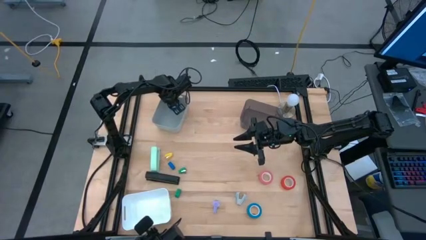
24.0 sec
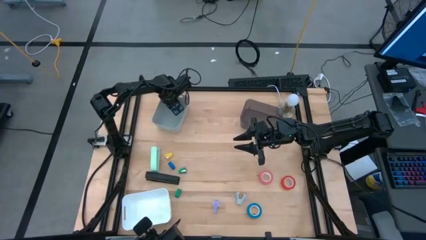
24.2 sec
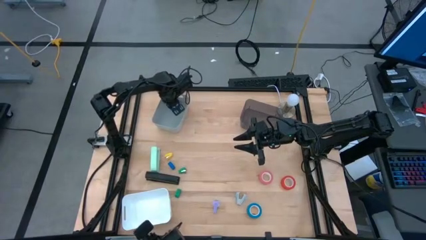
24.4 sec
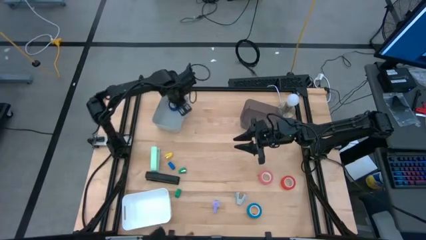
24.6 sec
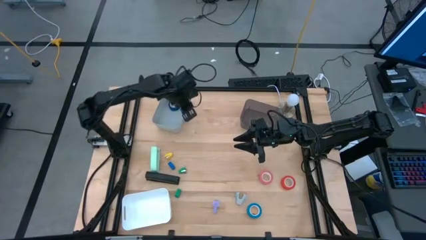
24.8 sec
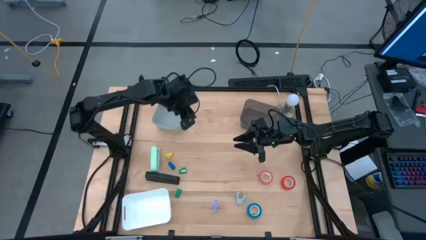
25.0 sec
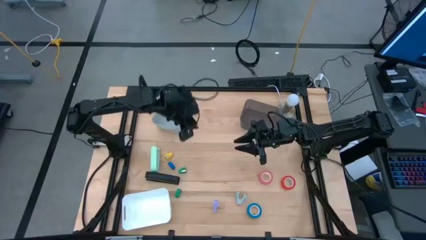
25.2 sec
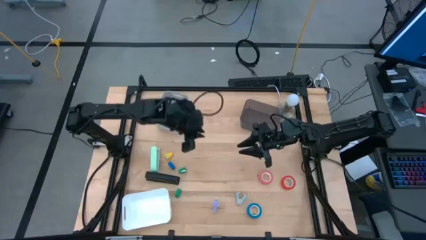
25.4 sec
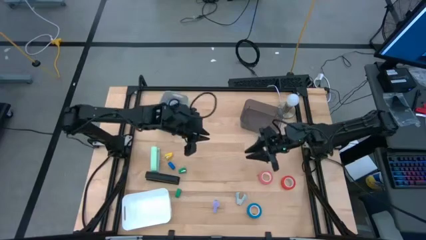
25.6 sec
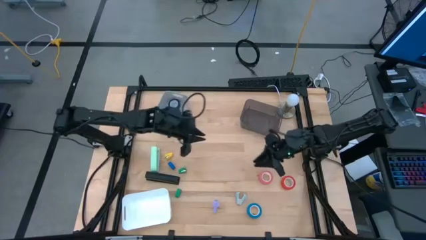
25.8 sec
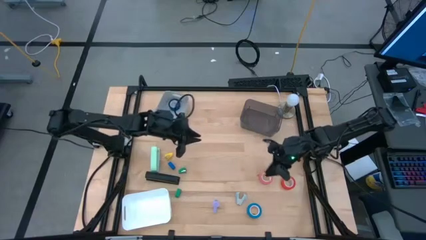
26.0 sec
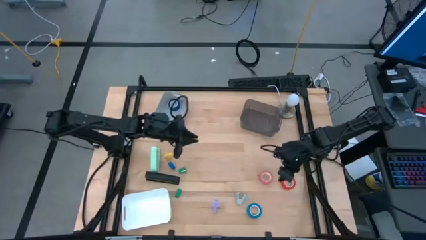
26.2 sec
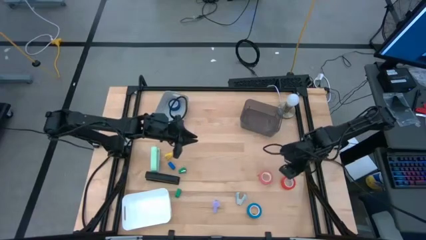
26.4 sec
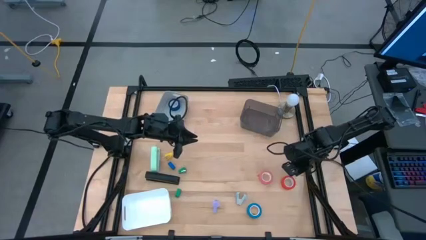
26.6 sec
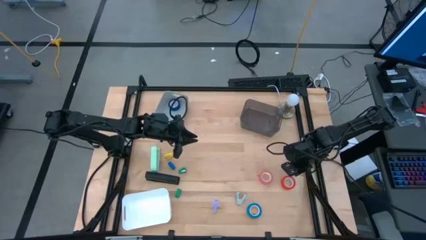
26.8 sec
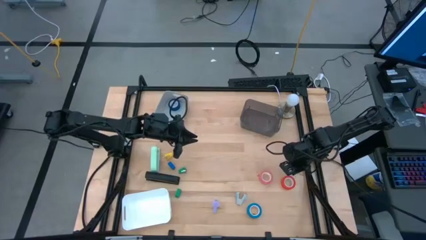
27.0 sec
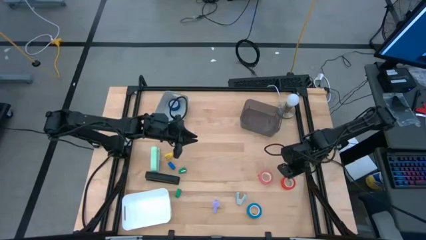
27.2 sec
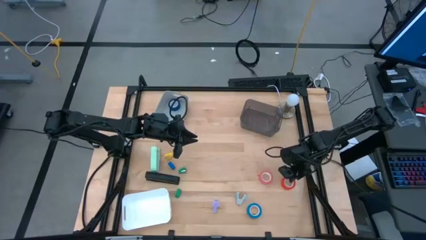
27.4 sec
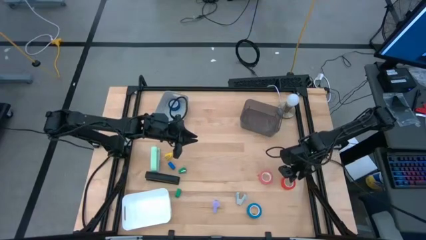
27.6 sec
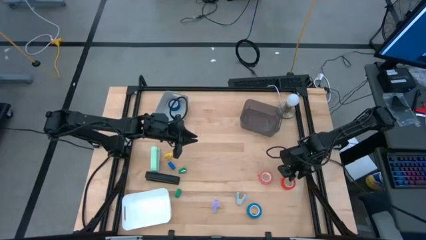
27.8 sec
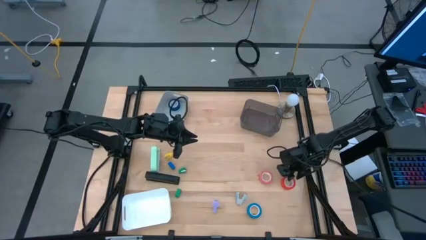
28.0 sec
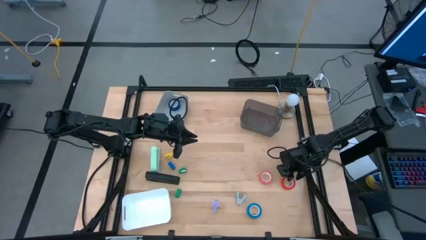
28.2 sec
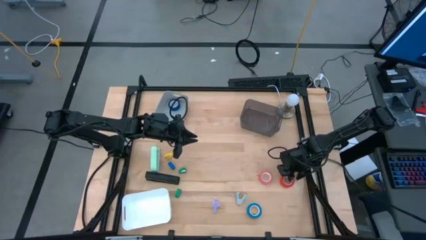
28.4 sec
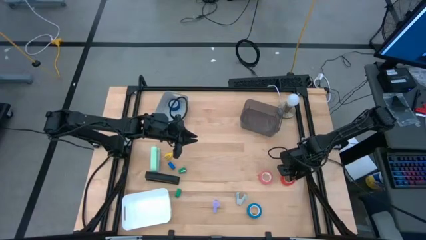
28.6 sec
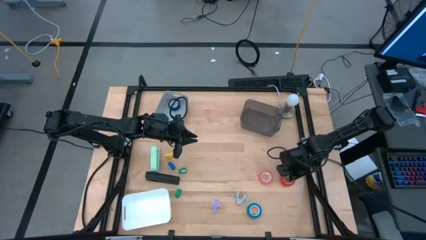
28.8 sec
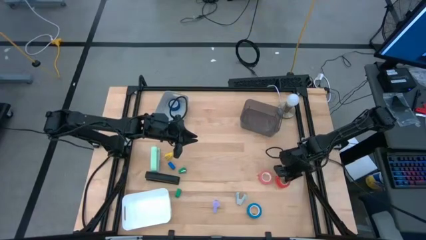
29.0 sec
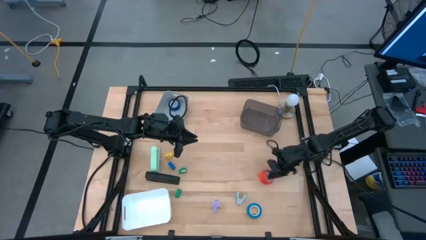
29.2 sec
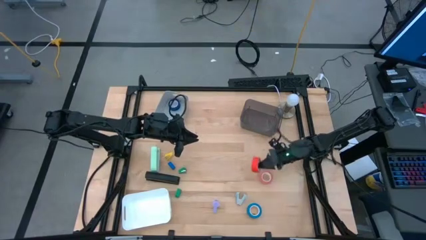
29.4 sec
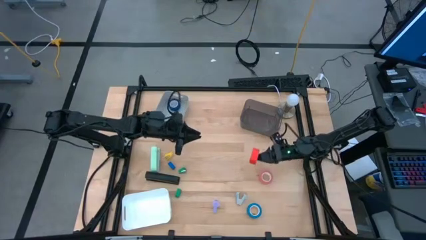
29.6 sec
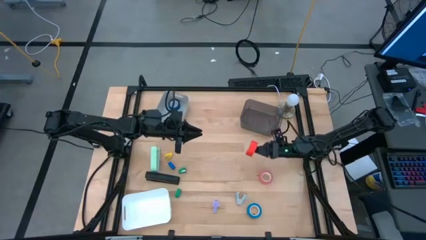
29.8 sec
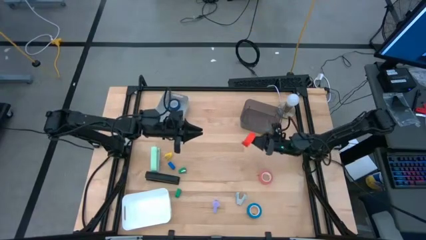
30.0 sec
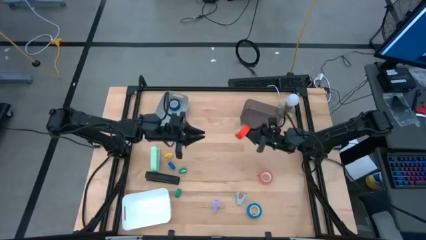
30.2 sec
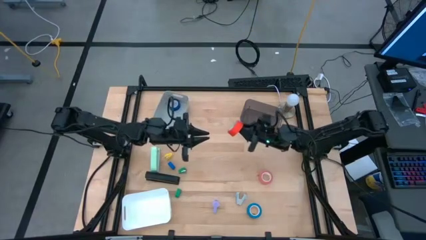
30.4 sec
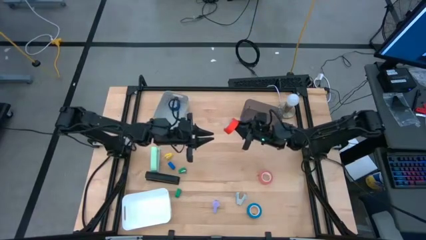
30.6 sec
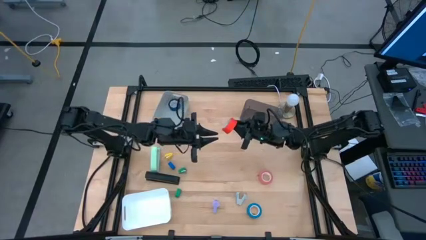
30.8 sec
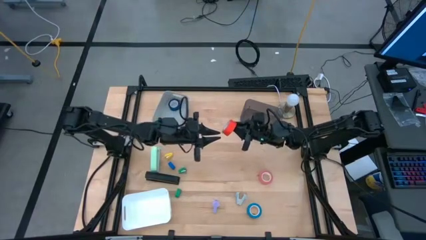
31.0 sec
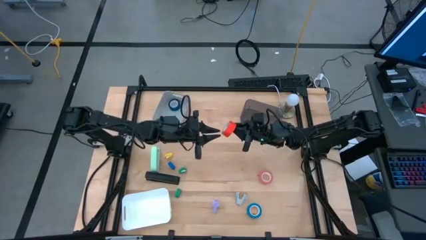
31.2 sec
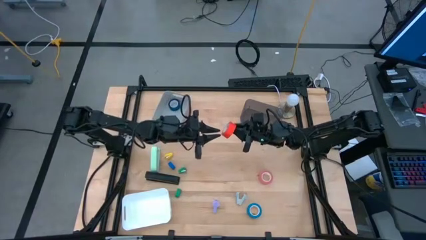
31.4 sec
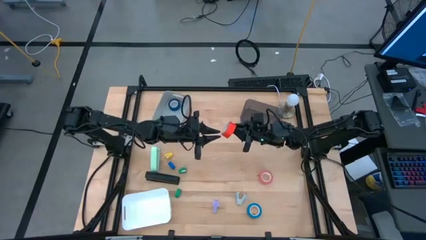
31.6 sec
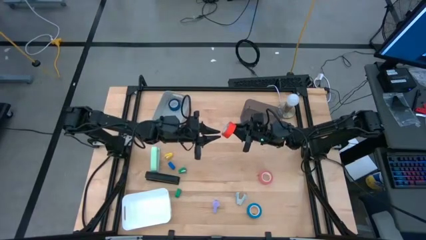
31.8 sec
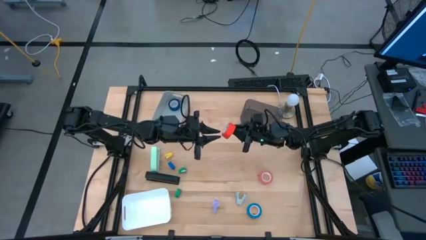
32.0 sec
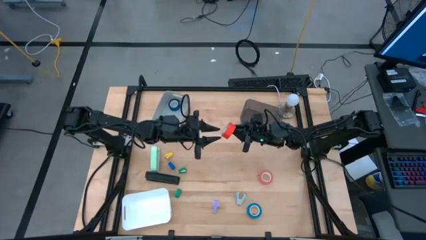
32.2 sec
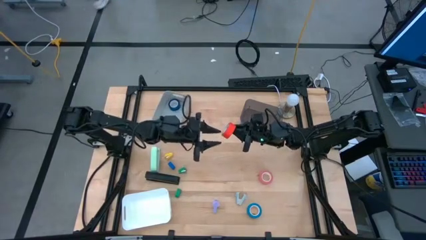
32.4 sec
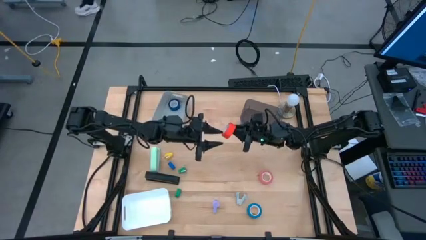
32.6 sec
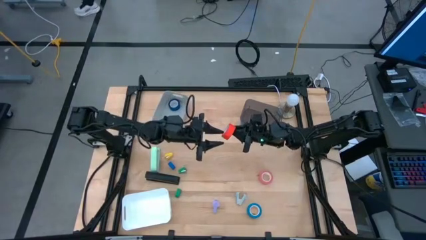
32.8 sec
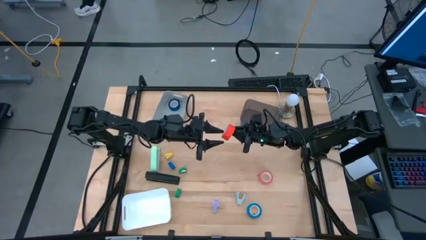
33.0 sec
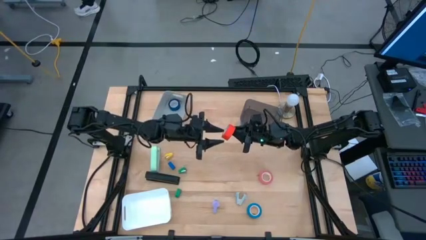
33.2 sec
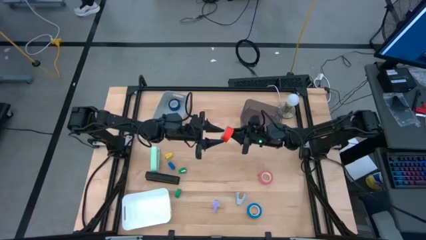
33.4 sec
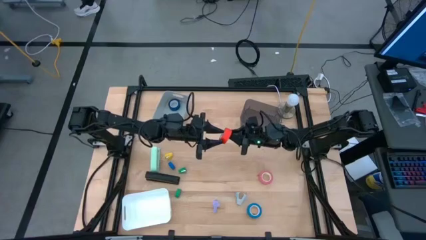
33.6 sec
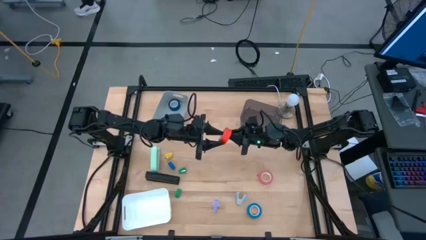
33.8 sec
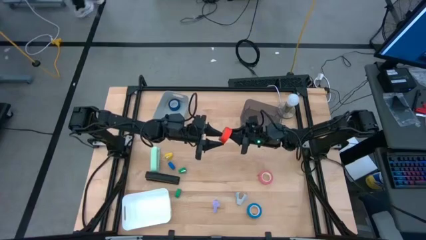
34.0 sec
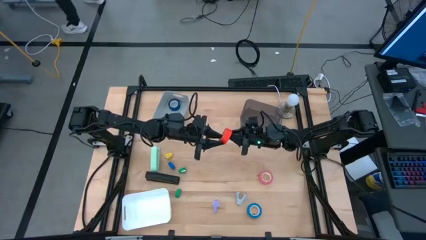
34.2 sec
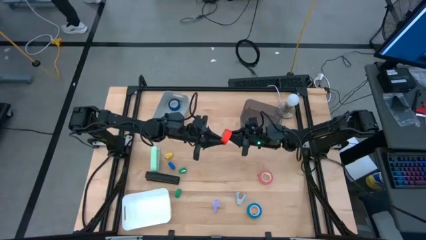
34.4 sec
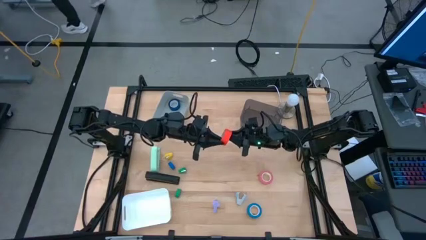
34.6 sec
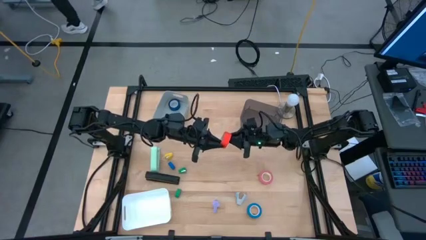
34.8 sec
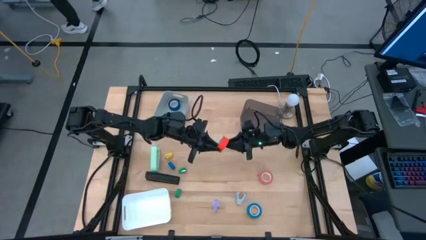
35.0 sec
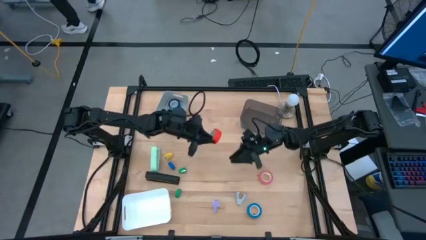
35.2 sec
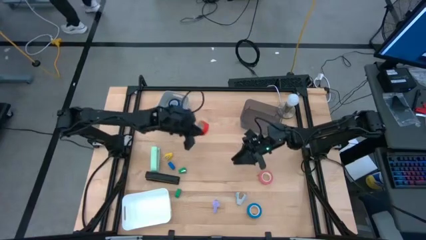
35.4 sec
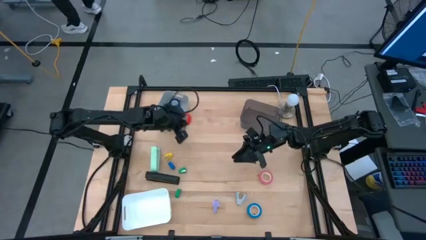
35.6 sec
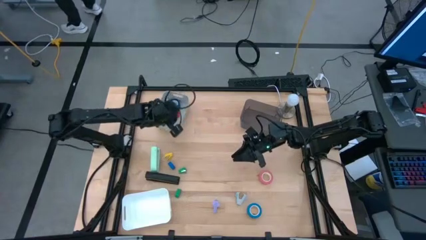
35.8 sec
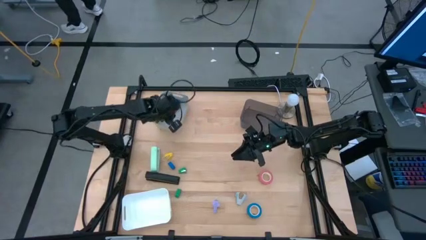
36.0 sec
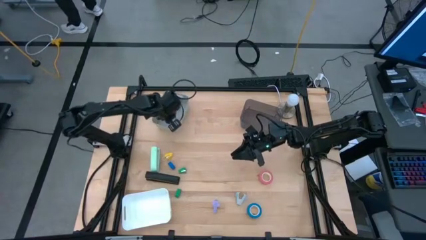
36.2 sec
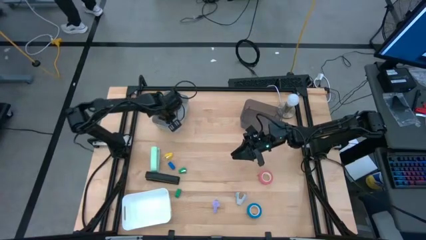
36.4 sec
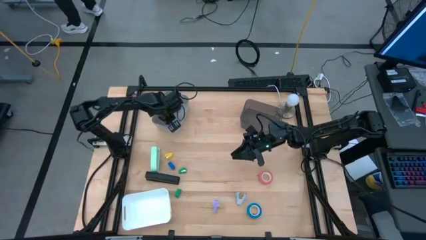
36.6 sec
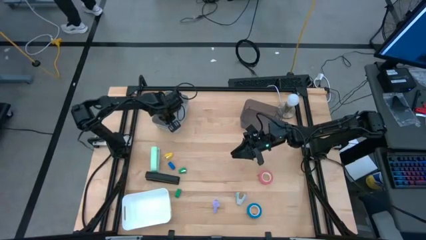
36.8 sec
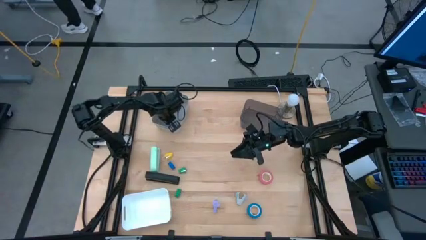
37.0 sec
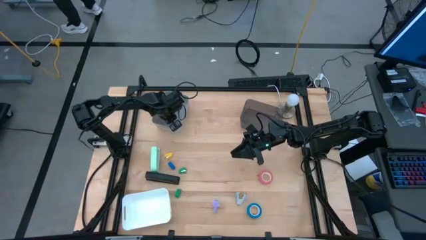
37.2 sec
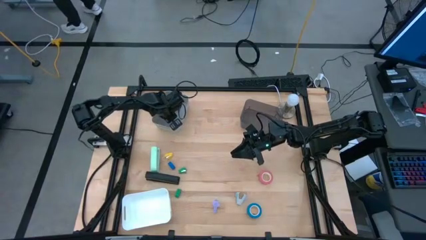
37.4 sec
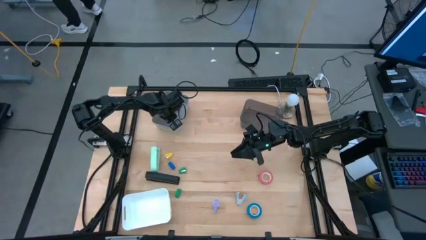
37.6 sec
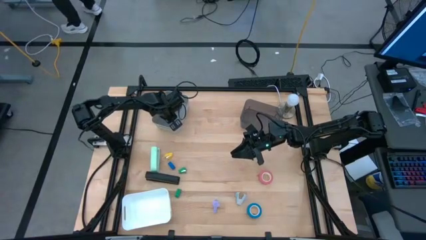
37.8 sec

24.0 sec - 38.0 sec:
Task: Pick and place Stapler, Stapler remover, tape
Put the orange tape into the gray bin
